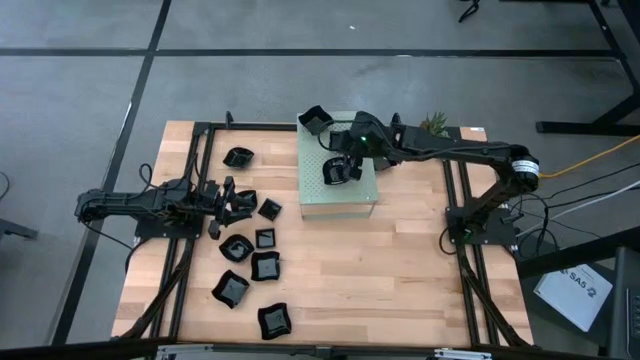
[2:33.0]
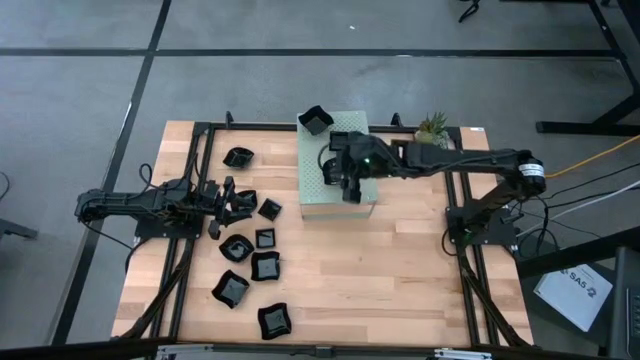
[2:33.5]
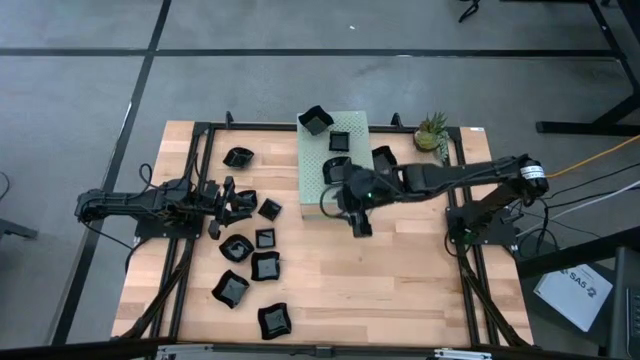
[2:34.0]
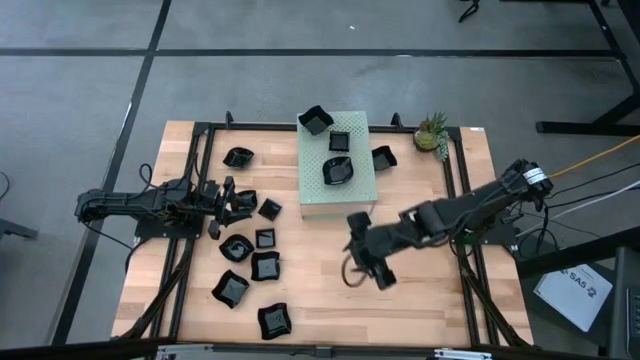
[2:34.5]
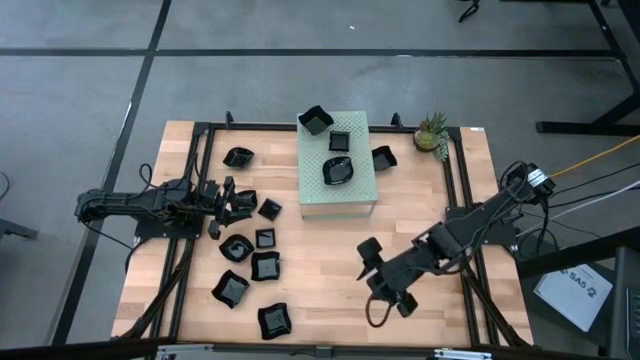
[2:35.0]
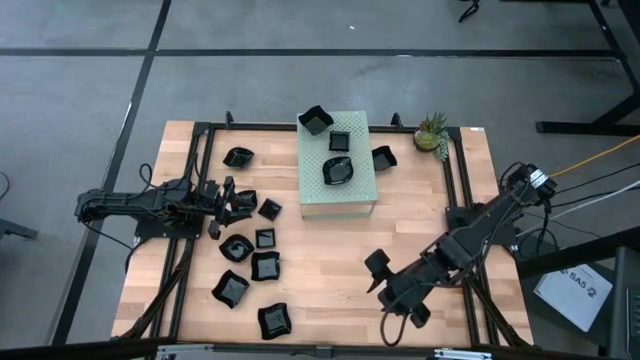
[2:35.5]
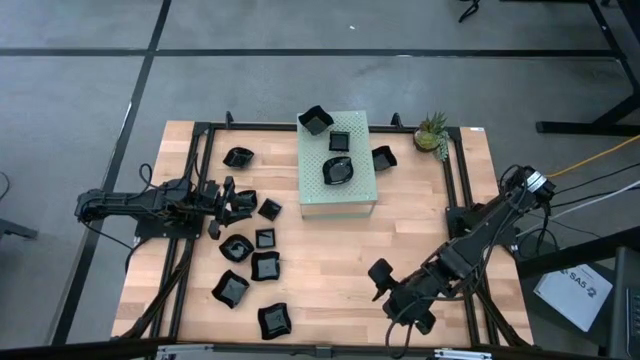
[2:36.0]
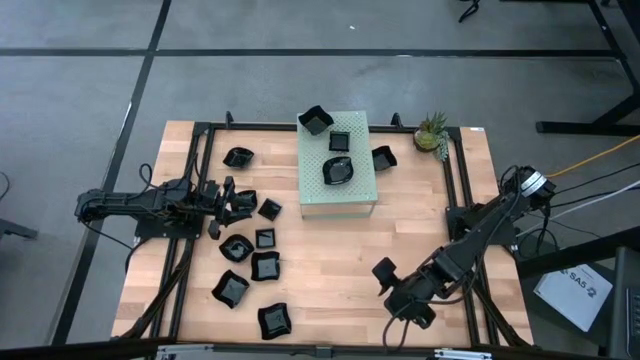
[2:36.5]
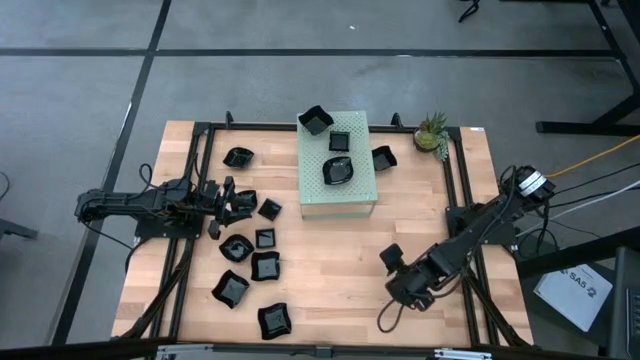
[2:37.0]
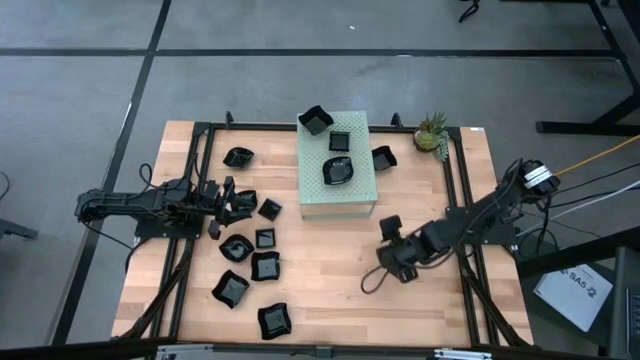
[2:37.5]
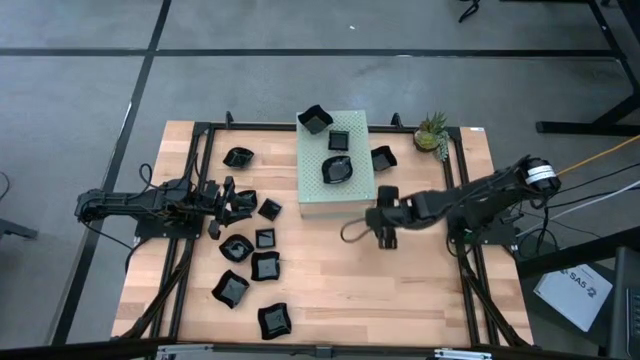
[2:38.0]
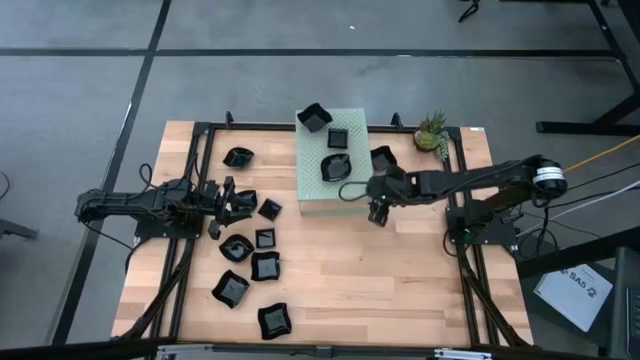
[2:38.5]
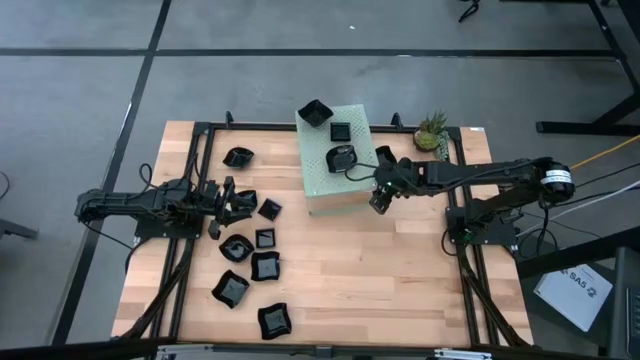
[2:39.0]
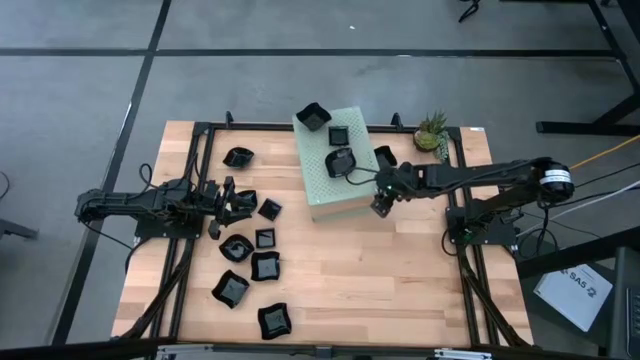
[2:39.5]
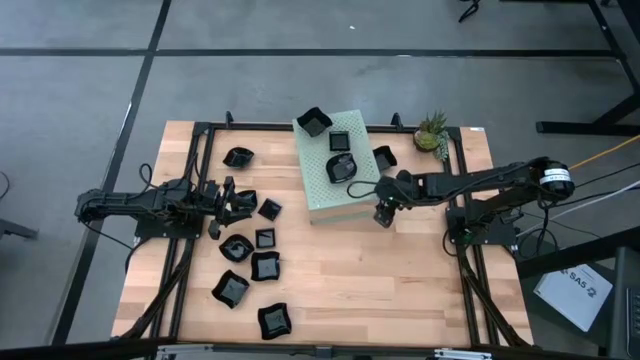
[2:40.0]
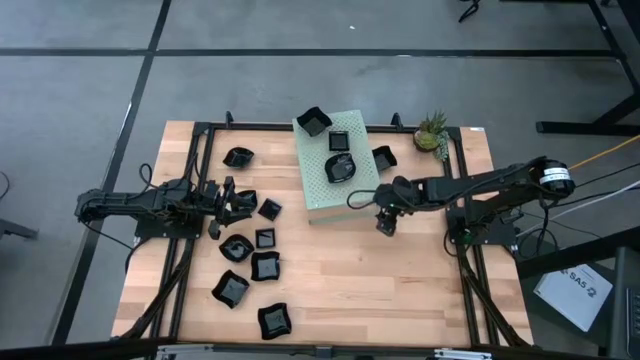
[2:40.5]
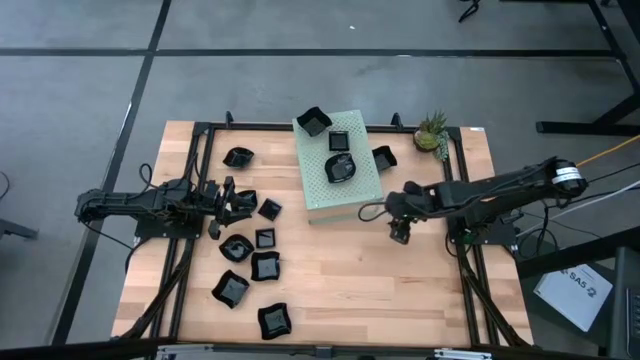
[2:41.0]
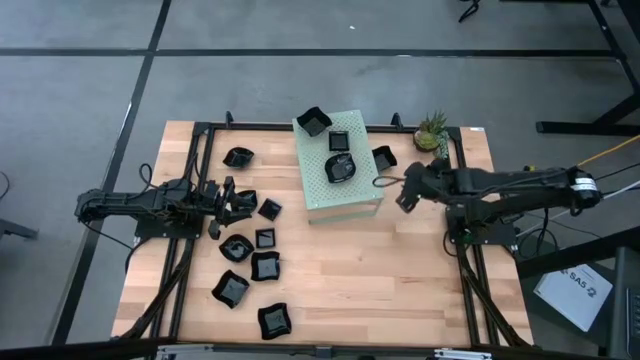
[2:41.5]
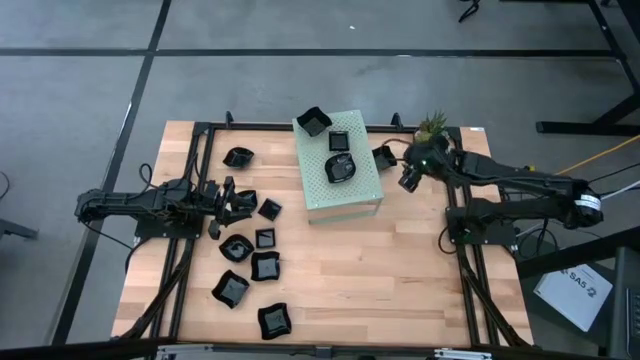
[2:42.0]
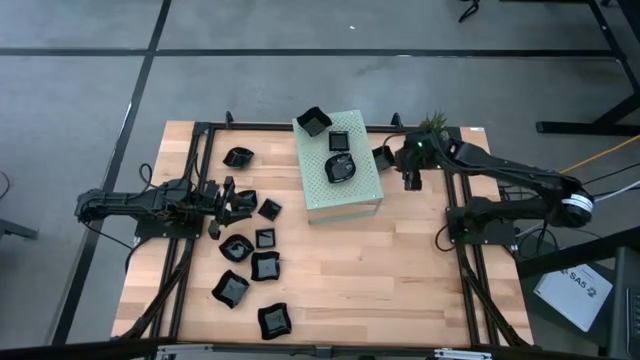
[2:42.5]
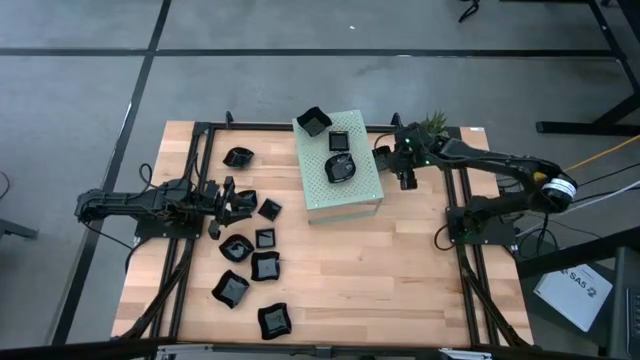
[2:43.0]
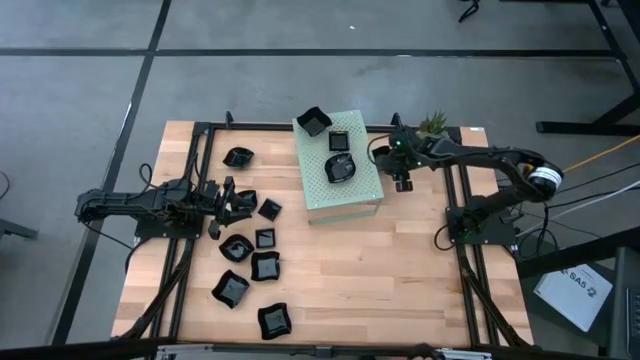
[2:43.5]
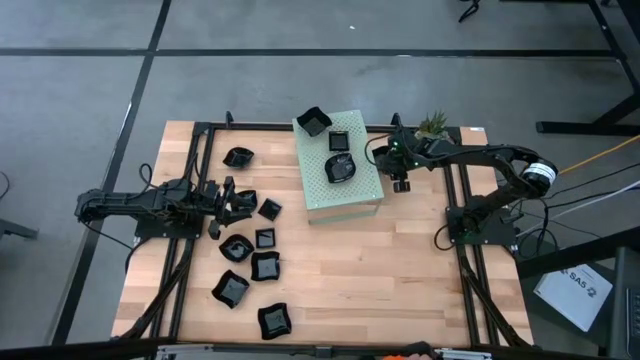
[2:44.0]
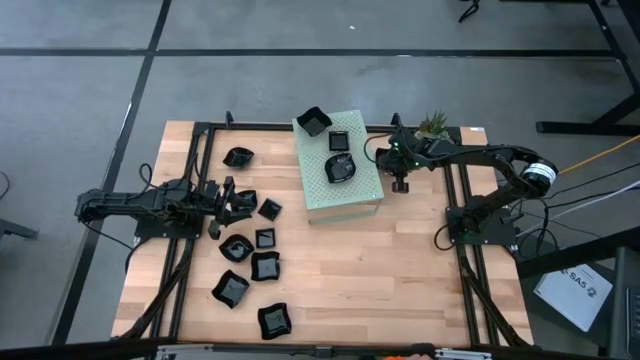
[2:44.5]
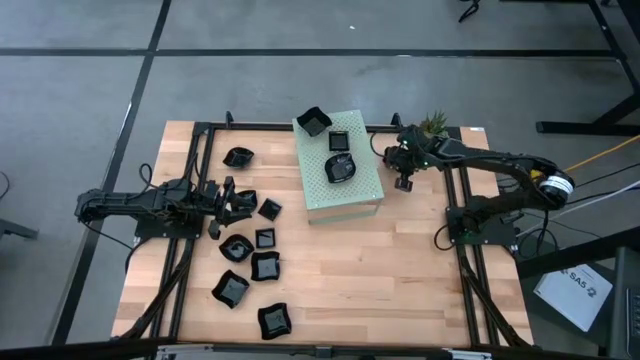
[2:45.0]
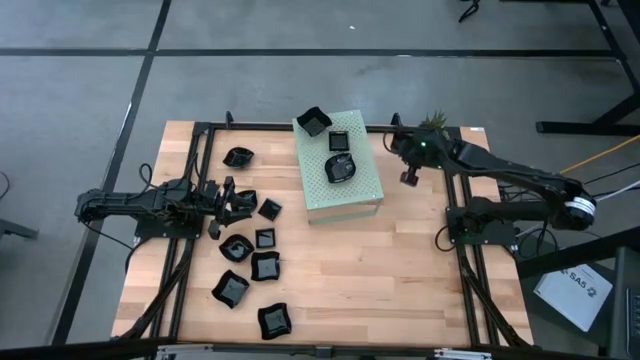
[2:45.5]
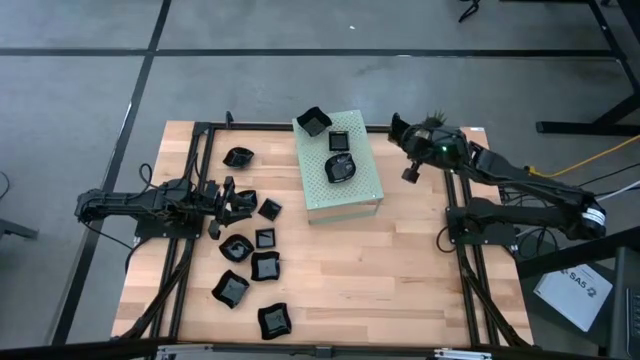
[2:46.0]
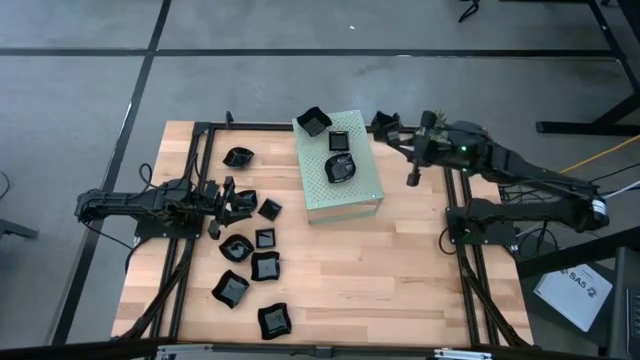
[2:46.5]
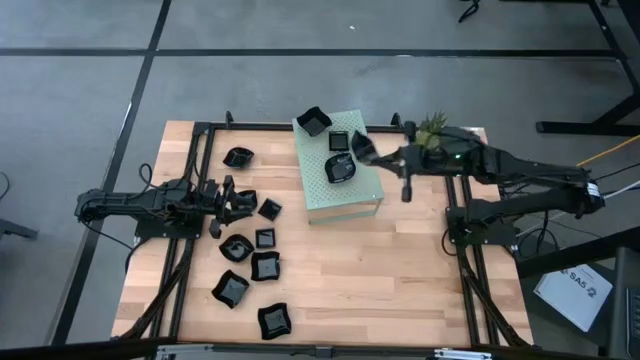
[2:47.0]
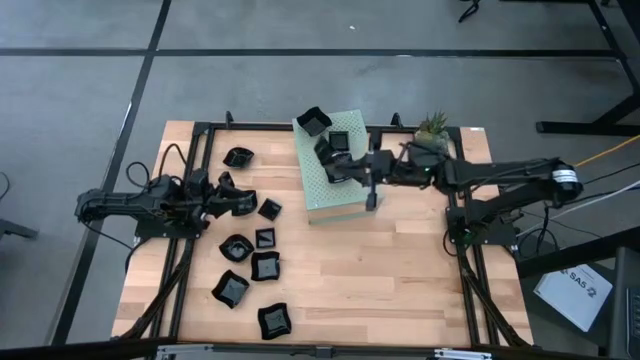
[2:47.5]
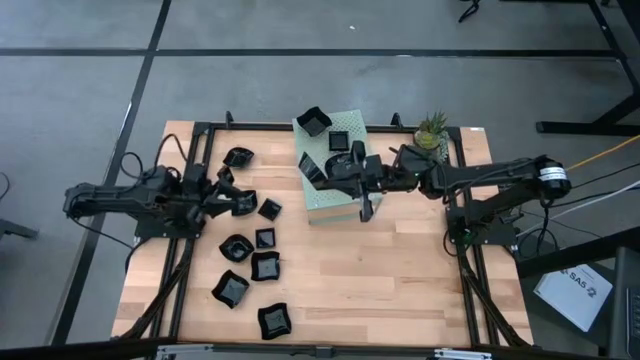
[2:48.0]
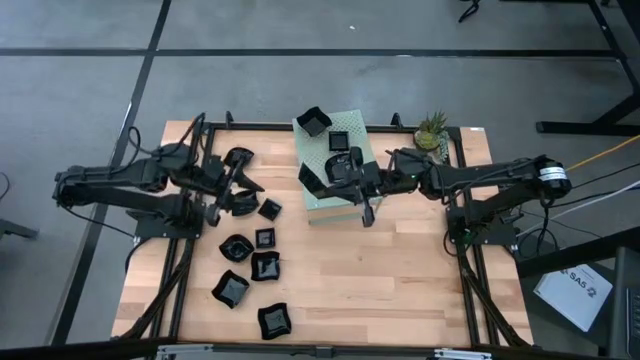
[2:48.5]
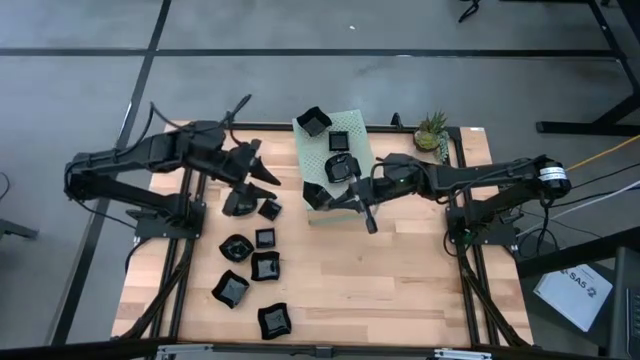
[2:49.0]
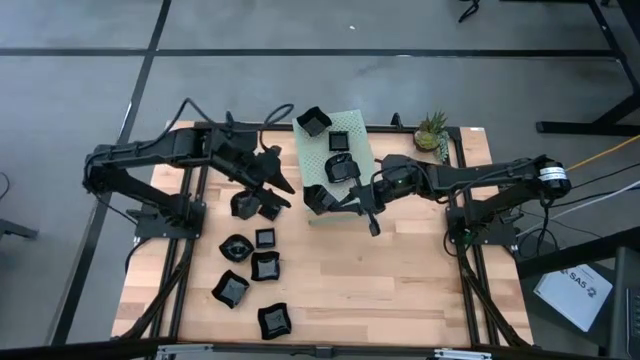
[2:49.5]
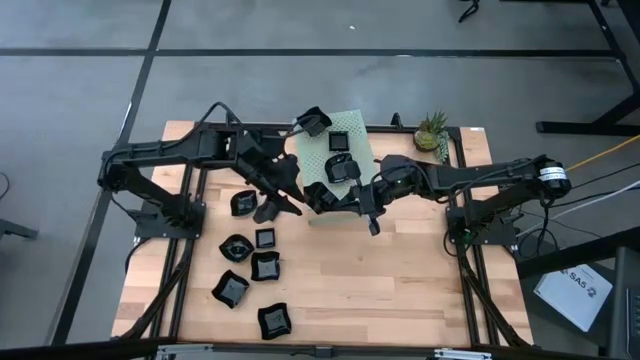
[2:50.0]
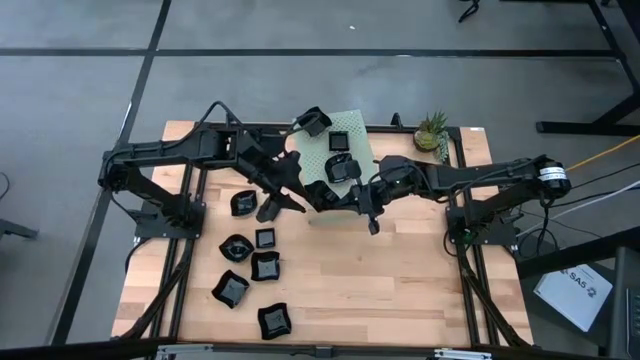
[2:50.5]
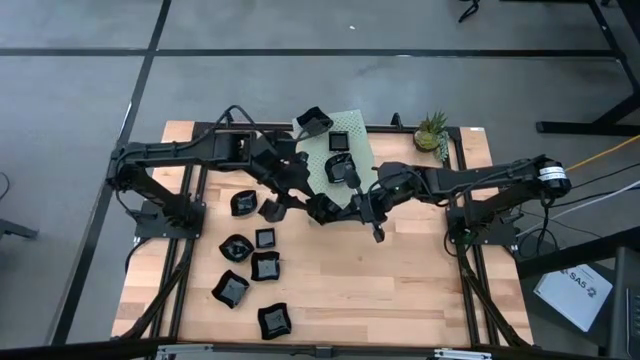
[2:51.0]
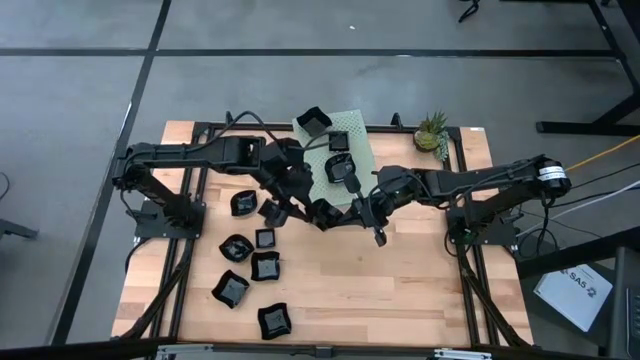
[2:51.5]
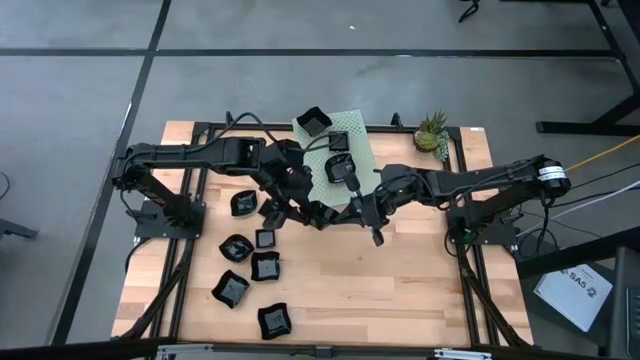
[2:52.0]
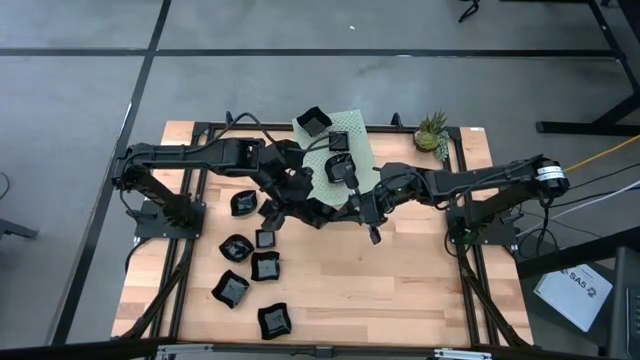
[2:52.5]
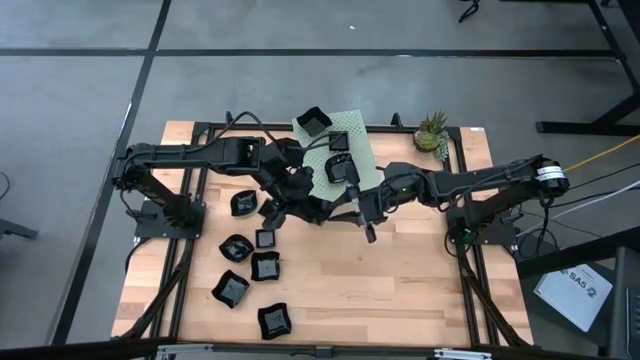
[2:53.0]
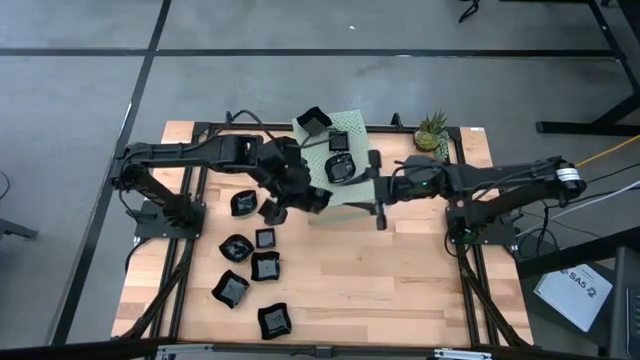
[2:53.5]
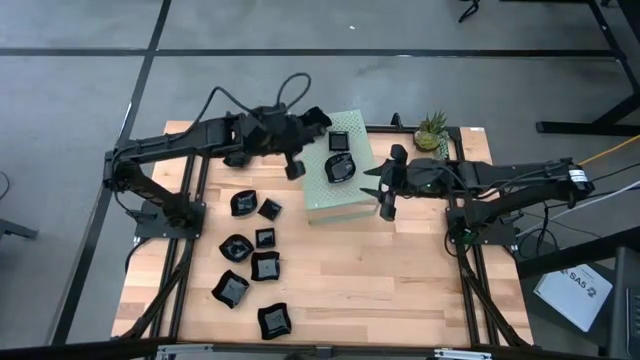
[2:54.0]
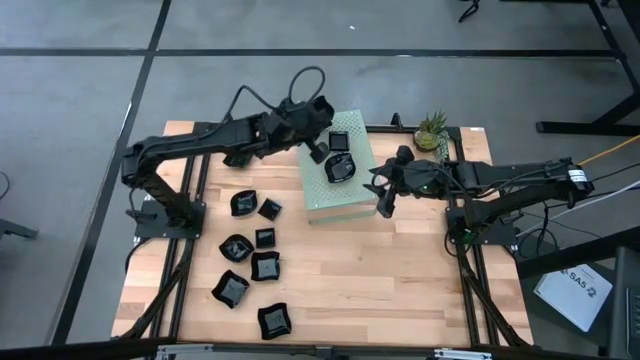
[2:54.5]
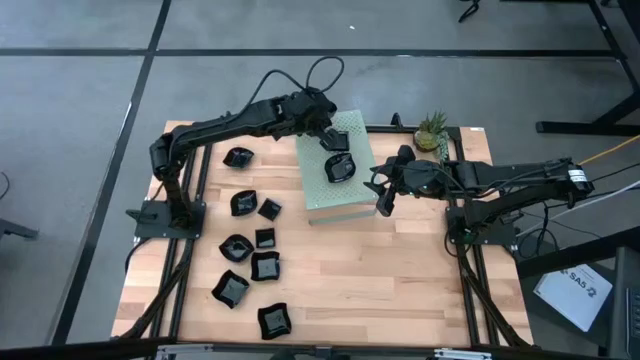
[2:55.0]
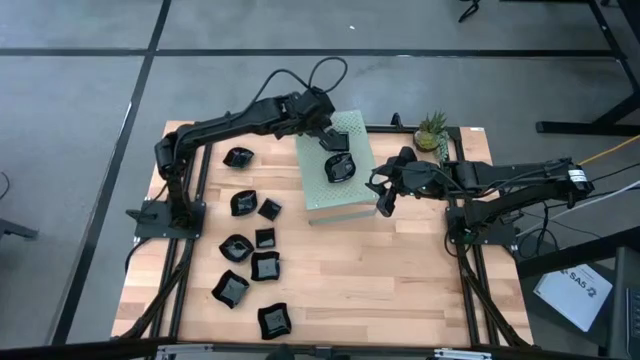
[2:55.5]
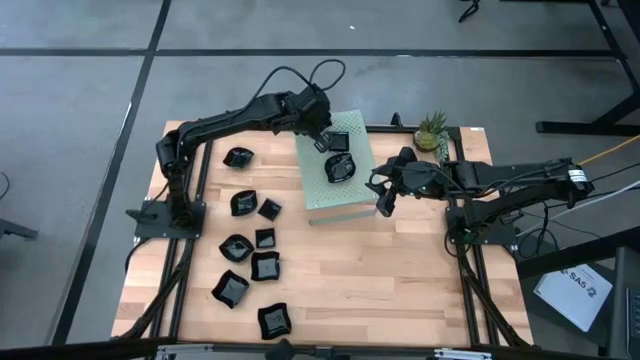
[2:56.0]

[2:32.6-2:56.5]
Task: Pick & Place Mini shaped plates
Stack the black distorted square plate on top of the black distorted square plates on the shelf
